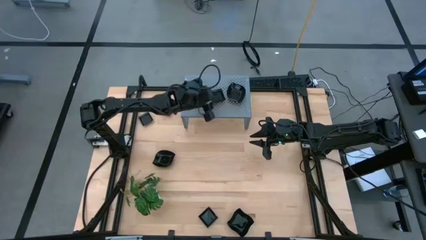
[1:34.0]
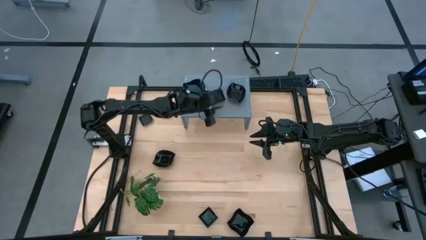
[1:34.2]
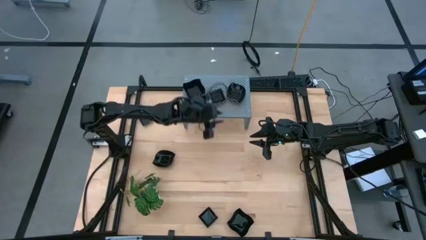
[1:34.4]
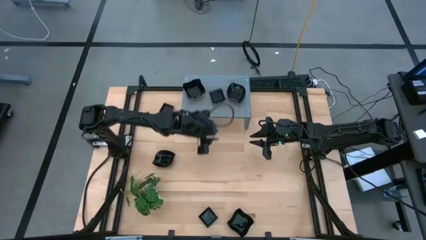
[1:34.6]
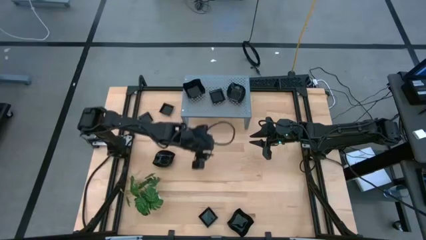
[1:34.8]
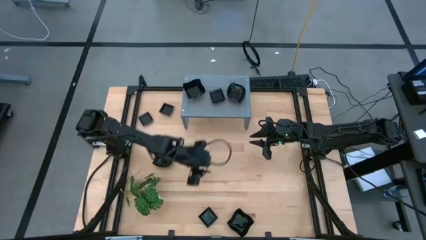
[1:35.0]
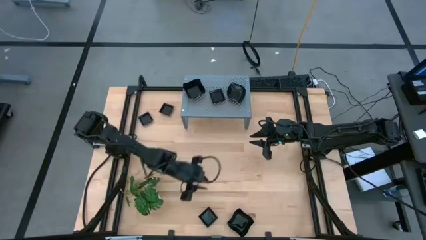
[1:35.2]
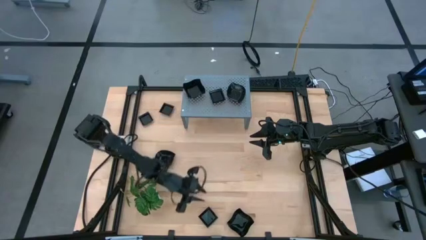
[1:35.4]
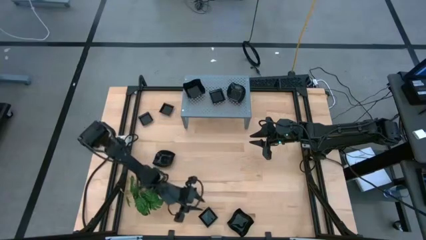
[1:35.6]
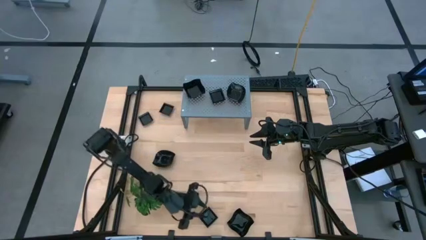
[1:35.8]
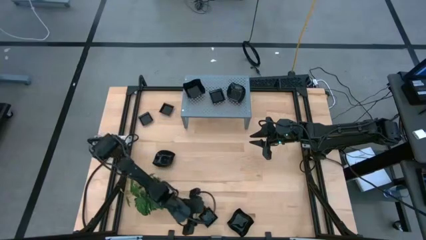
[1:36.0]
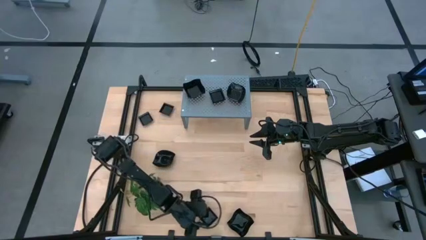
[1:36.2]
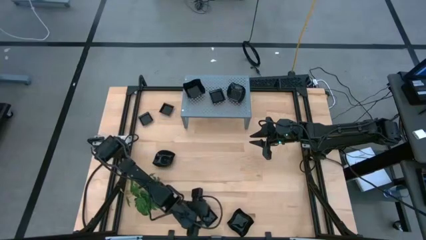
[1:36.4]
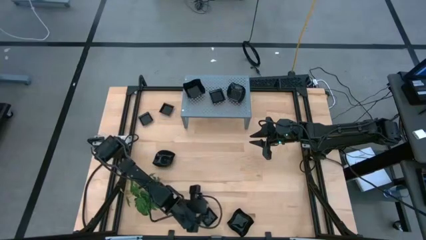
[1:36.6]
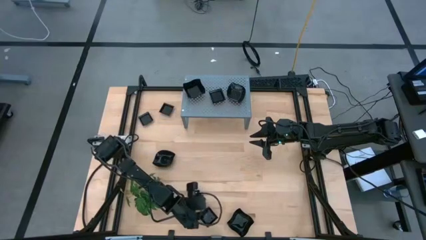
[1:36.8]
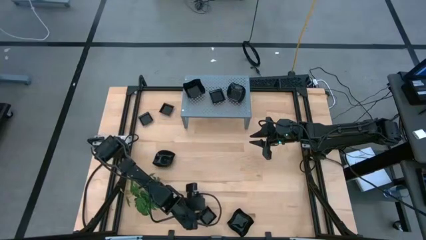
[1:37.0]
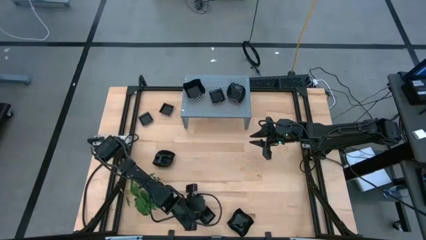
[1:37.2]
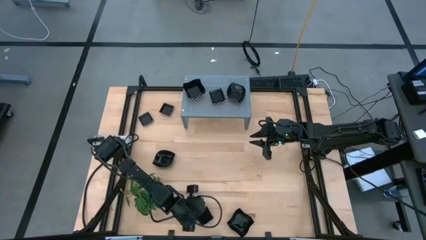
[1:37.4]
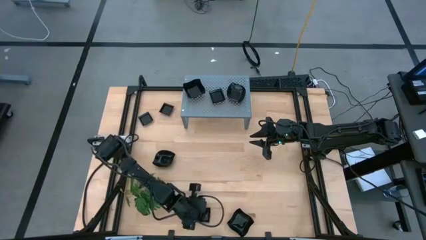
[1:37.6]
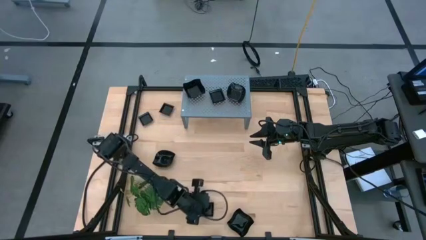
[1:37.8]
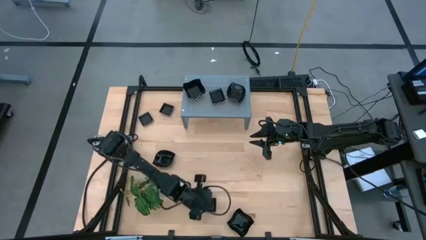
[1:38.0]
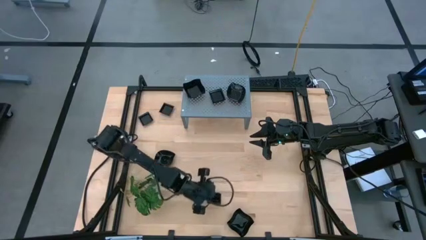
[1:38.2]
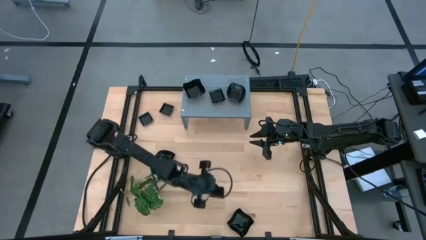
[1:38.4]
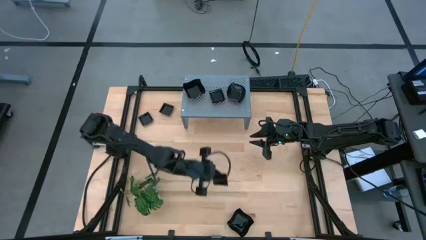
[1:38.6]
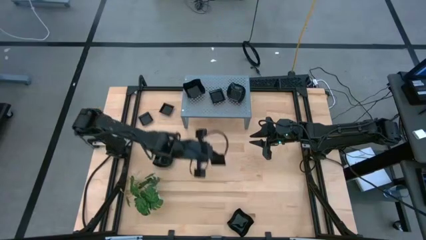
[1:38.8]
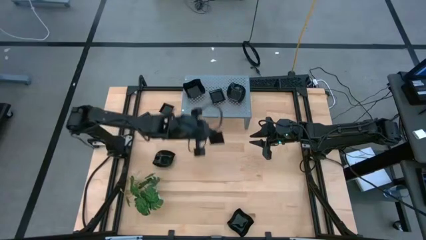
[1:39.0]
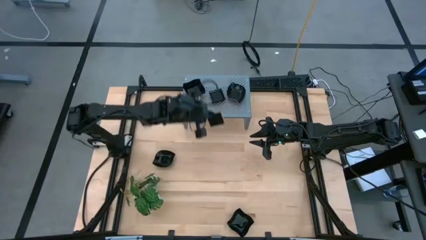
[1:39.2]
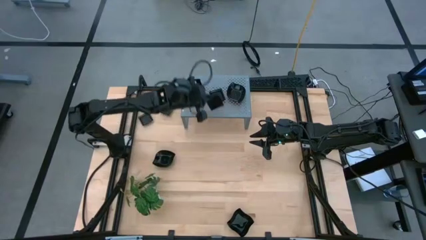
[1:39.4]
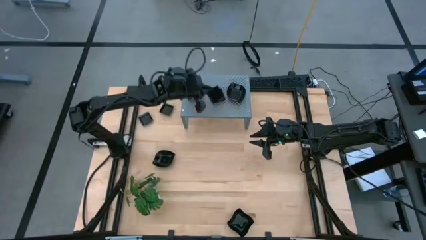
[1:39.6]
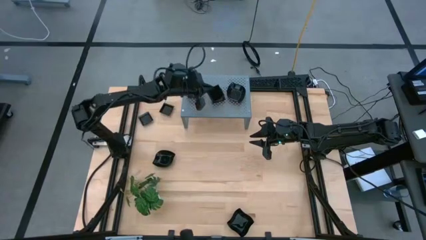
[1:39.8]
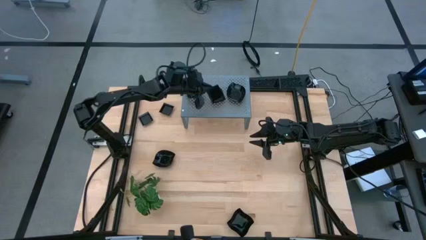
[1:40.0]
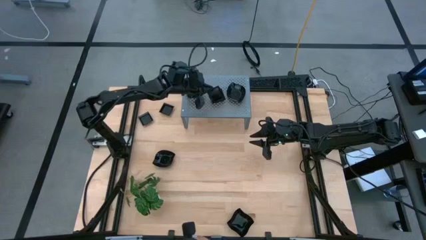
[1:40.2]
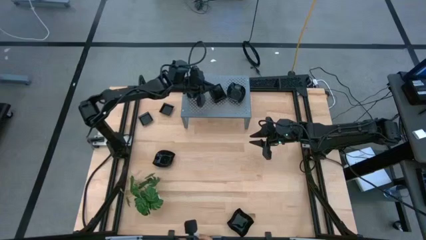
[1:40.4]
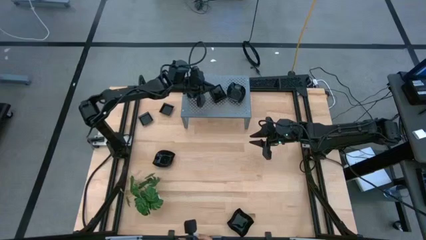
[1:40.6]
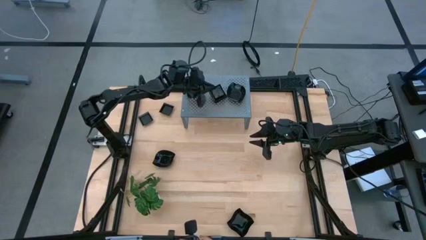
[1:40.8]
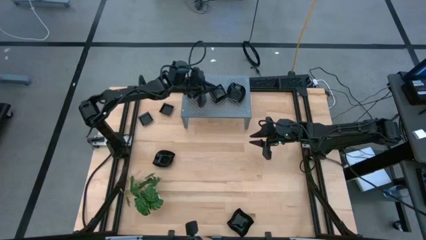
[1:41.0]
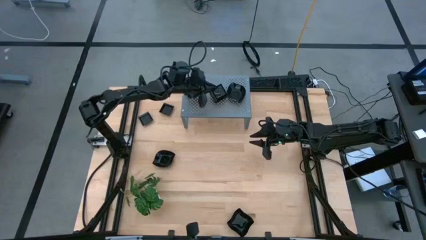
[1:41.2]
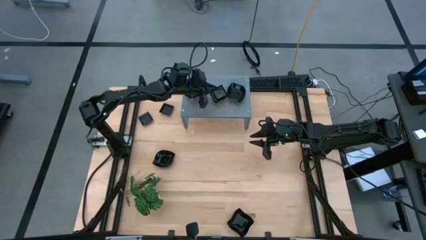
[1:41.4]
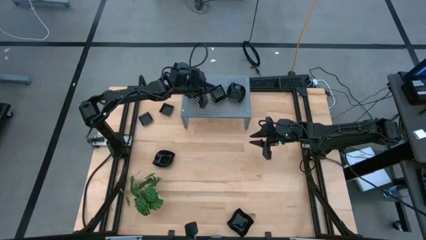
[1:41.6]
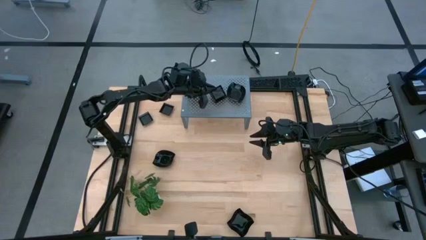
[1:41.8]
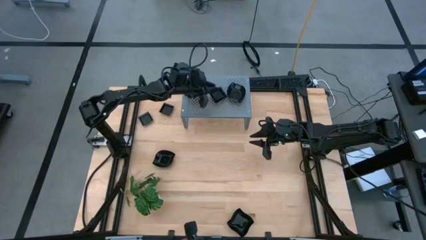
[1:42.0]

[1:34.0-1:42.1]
Task: Pick & Place Mini shaped plates
Stack the black square plate on top of the black square plates on the shelf

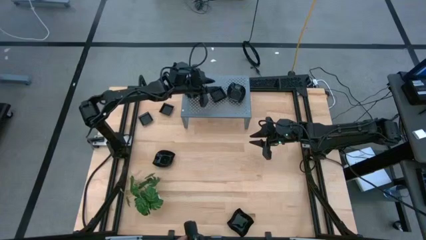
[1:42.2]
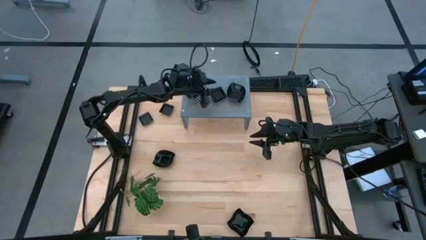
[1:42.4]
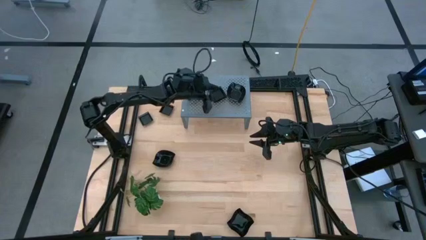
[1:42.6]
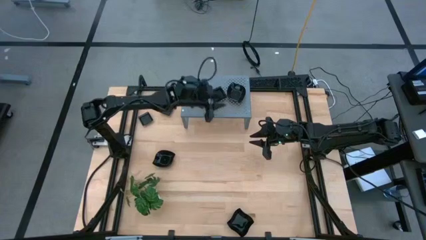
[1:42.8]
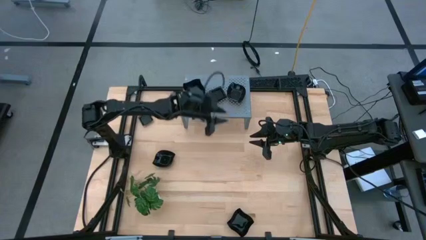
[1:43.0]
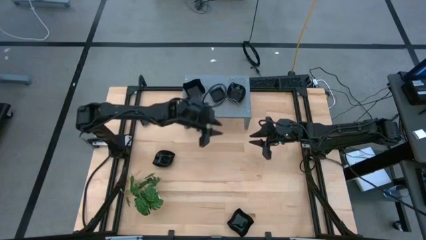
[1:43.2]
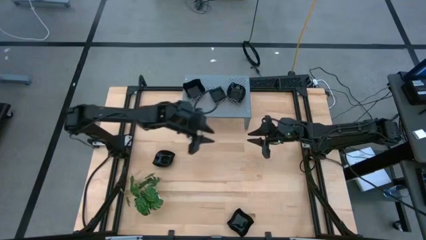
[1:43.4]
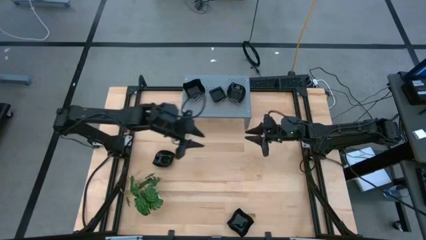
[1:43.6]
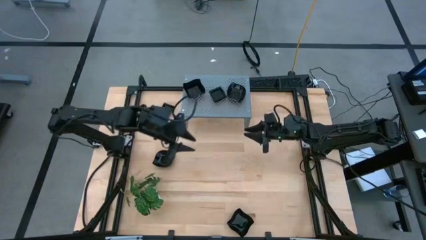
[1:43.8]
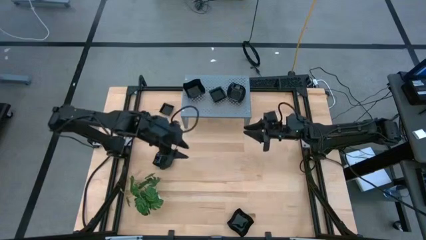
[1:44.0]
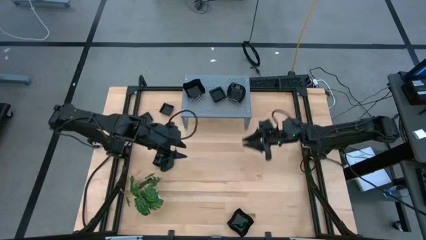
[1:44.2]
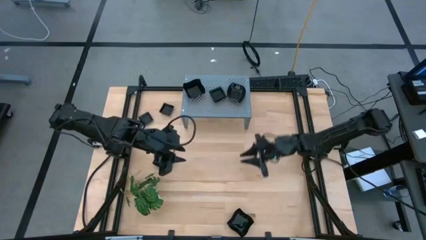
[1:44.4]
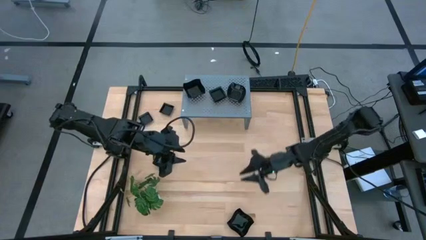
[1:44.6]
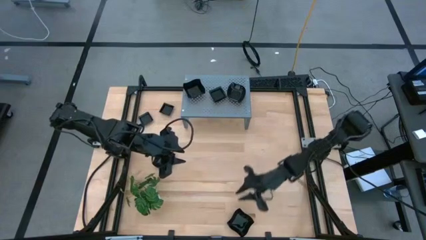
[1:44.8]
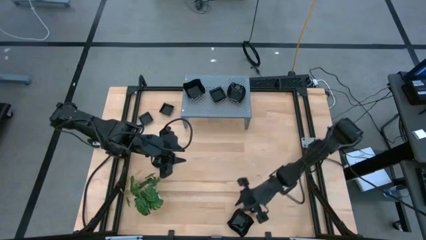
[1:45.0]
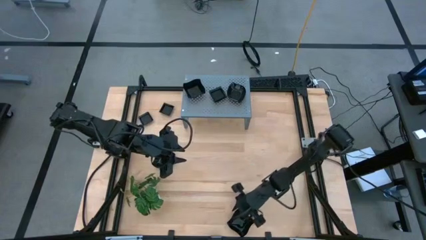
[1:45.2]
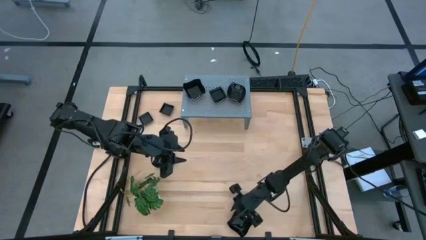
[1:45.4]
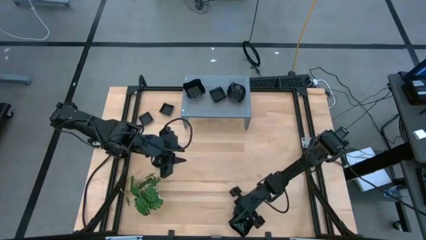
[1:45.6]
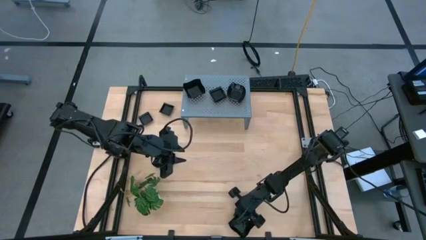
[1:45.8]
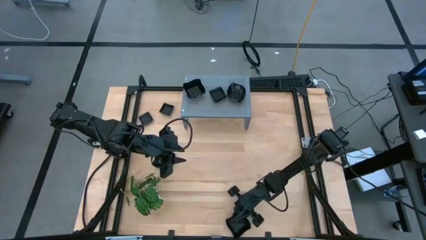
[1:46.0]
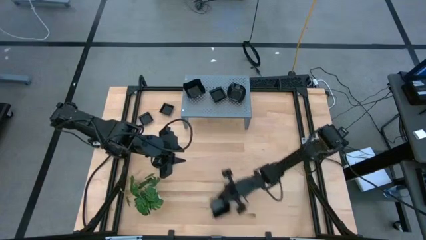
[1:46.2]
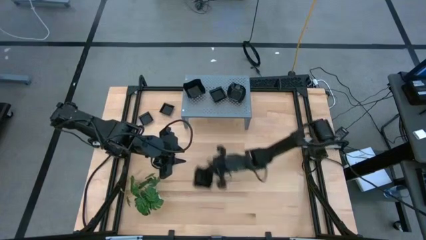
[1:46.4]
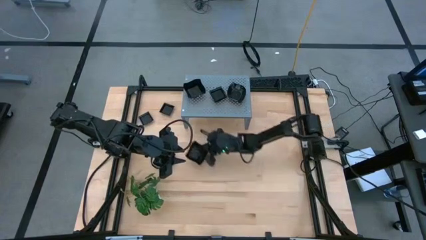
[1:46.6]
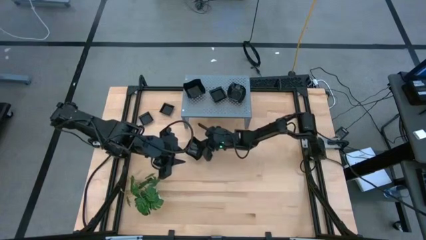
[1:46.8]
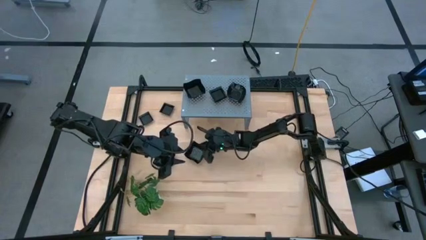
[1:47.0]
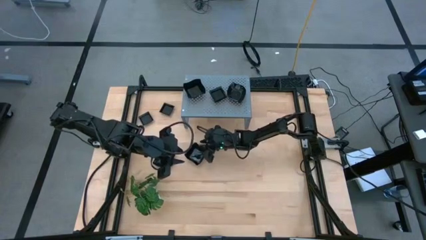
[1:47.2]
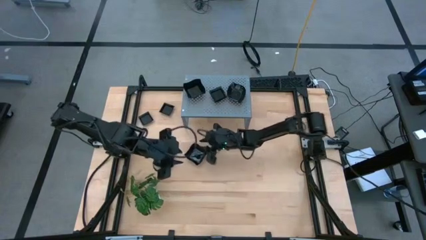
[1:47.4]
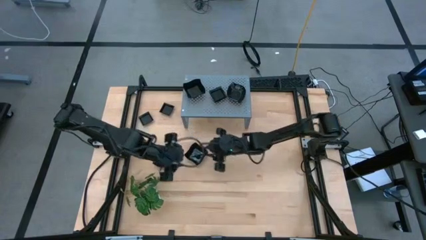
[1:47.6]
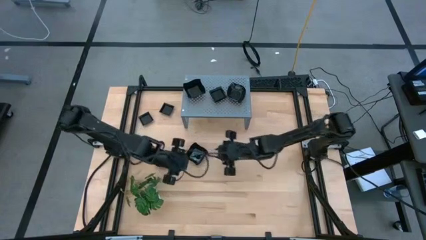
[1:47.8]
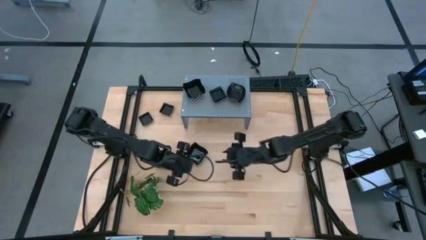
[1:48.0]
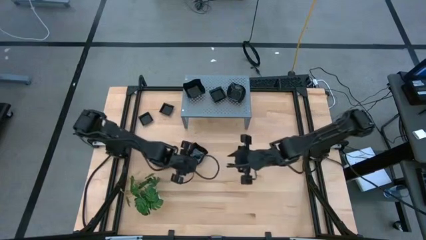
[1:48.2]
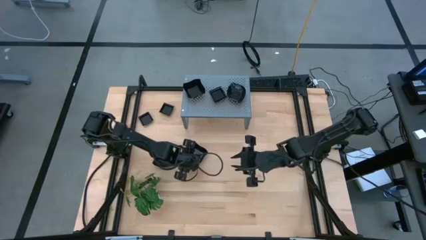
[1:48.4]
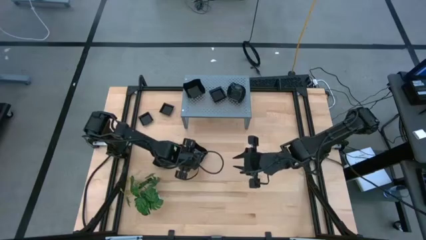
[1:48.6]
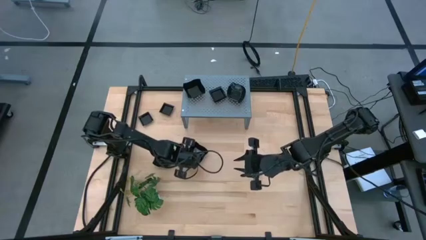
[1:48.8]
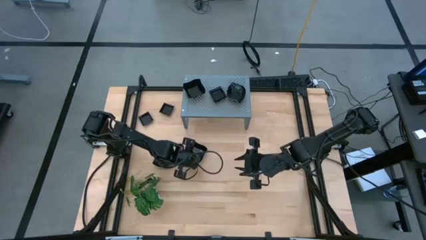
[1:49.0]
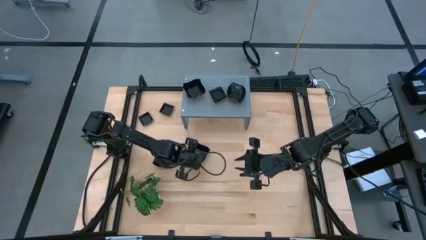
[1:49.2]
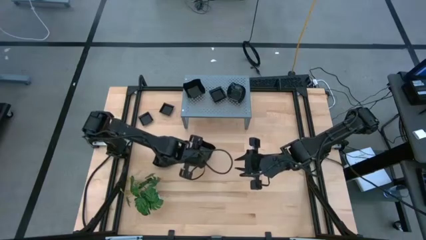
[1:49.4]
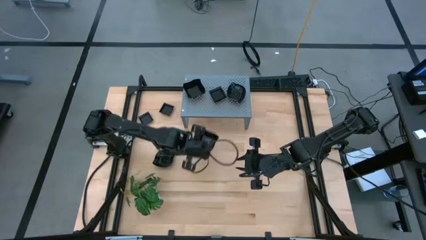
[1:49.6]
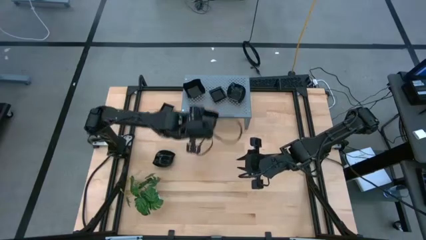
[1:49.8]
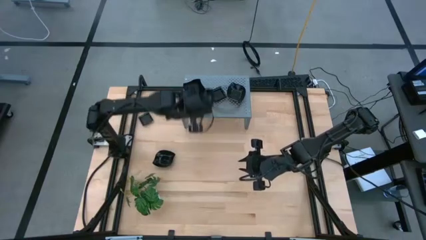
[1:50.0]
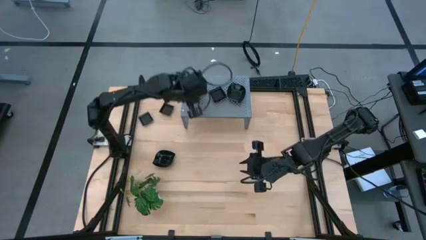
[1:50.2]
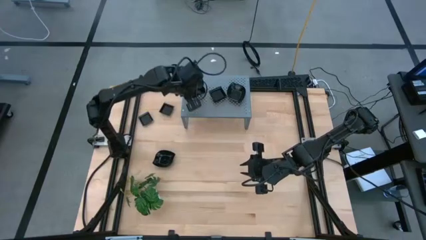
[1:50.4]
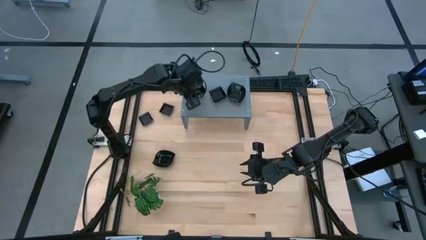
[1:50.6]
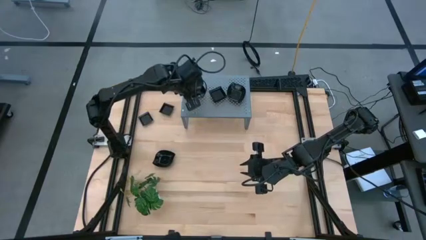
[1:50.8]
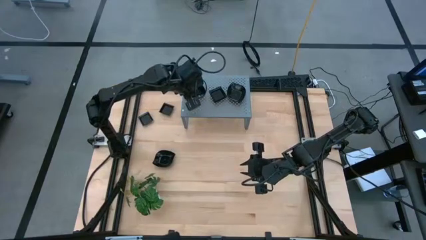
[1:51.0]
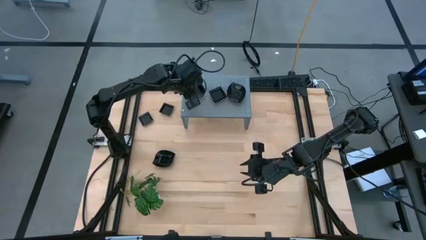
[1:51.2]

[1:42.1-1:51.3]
Stack the black distorted square plate on top of the black distorted square plates on the shelf
